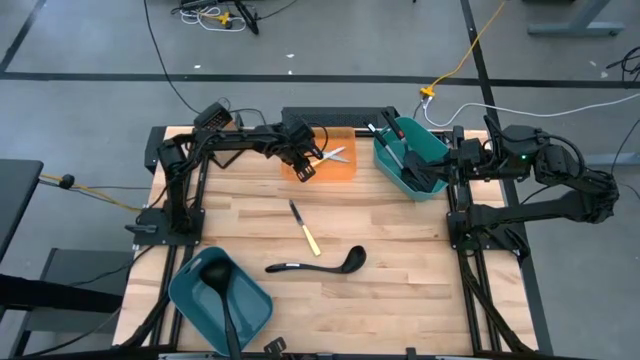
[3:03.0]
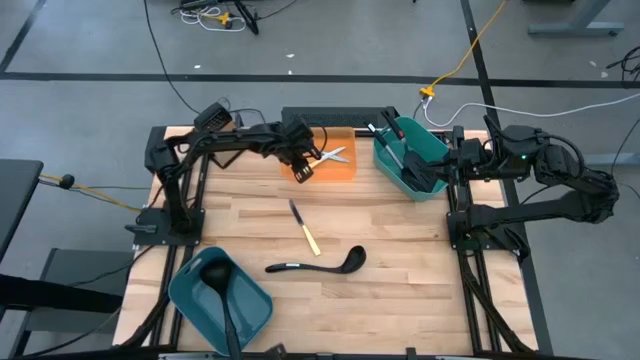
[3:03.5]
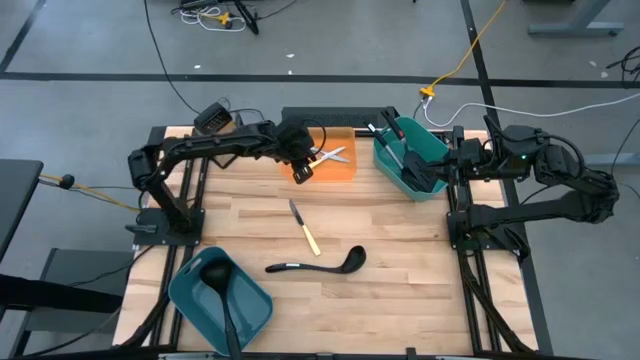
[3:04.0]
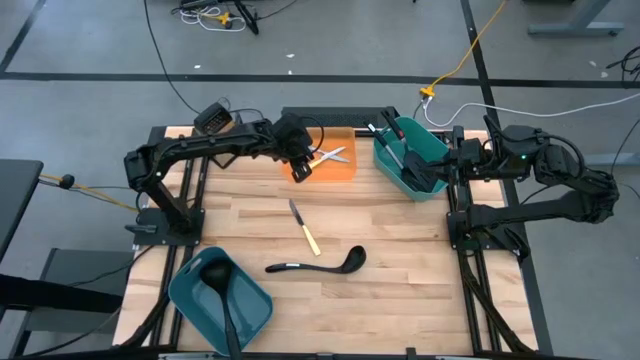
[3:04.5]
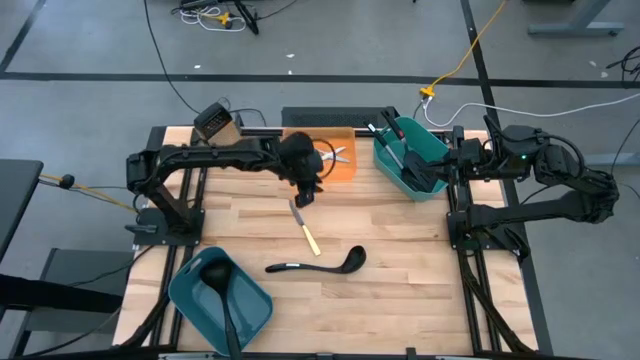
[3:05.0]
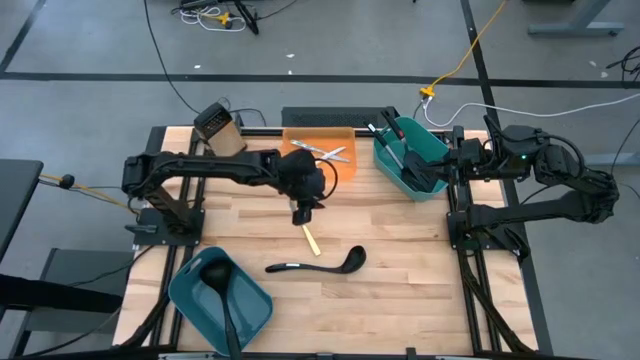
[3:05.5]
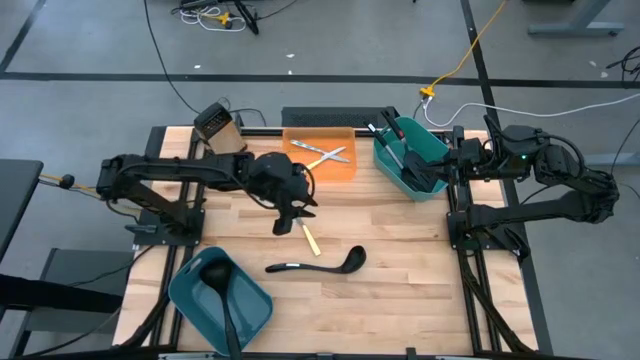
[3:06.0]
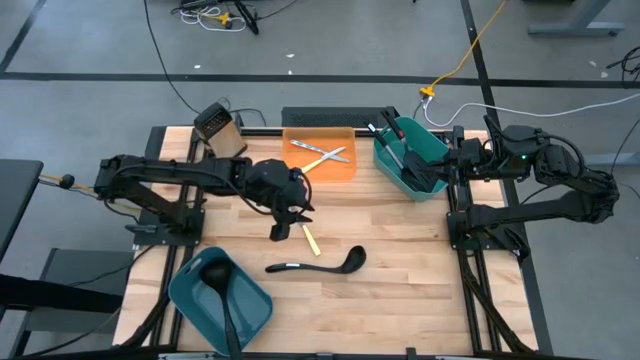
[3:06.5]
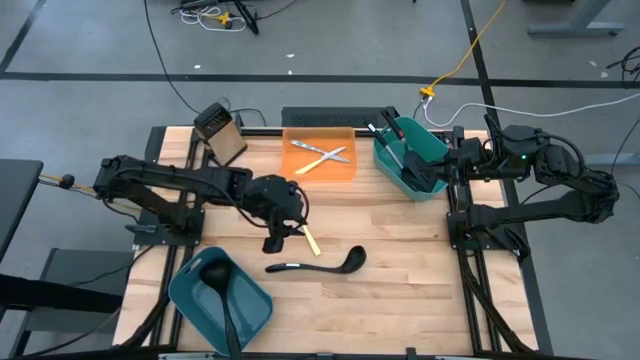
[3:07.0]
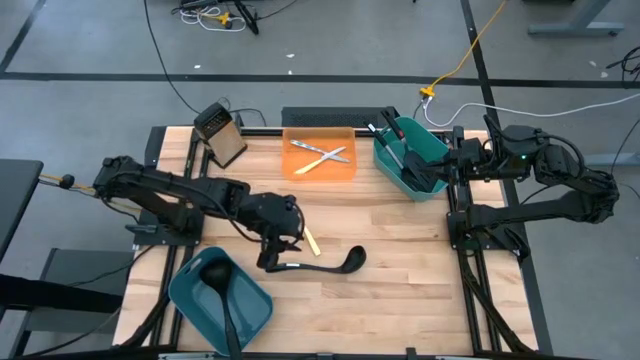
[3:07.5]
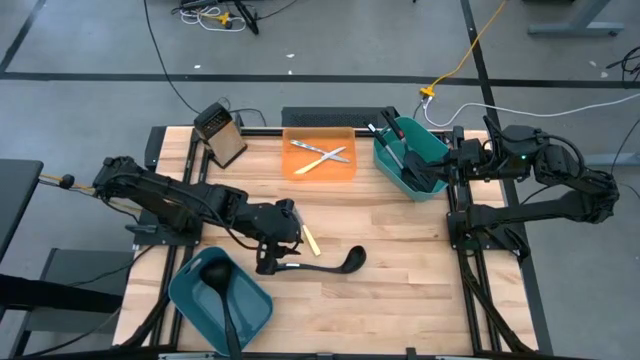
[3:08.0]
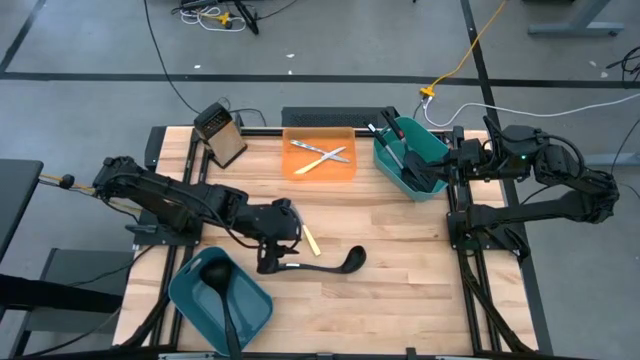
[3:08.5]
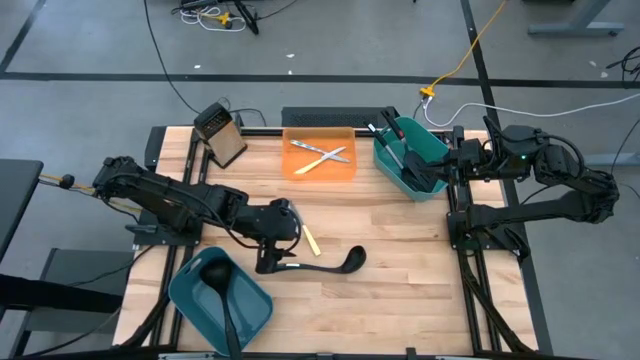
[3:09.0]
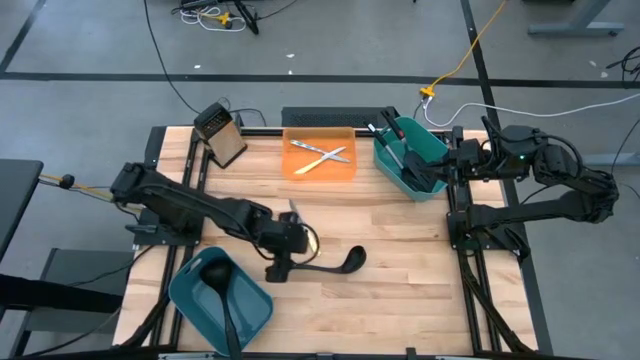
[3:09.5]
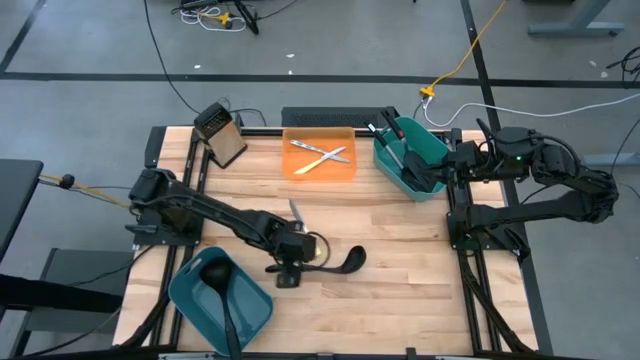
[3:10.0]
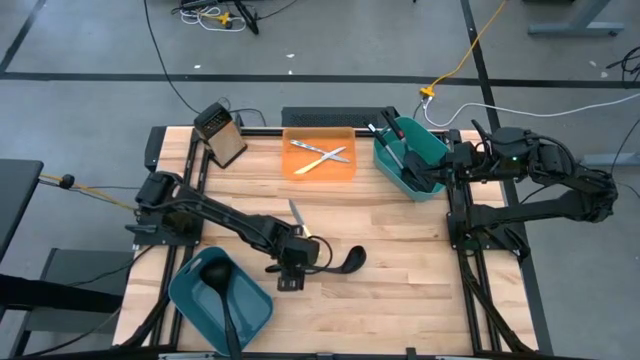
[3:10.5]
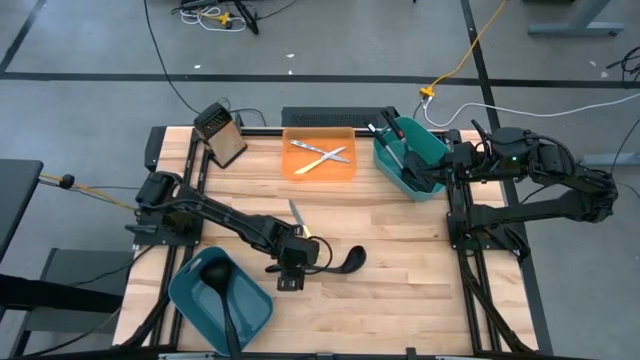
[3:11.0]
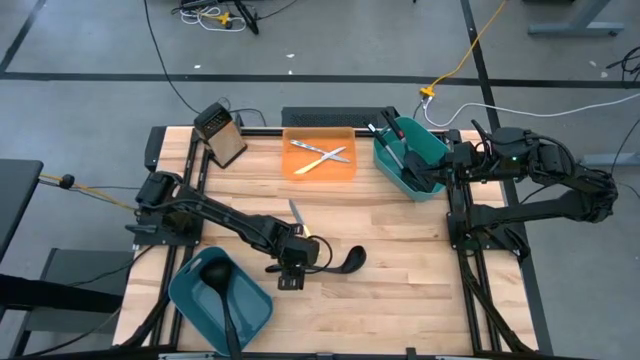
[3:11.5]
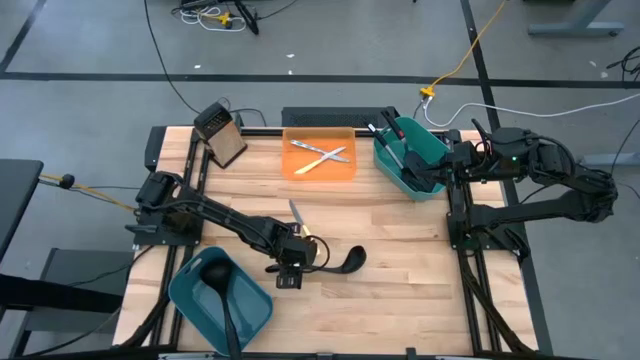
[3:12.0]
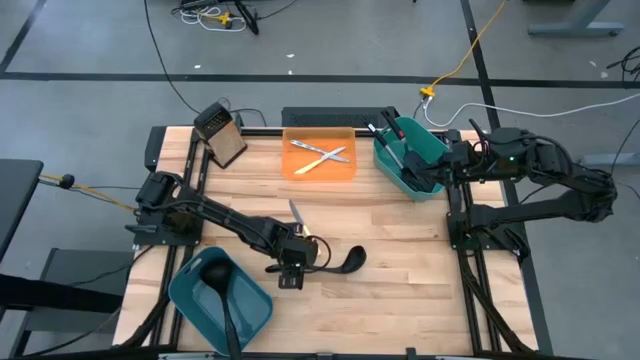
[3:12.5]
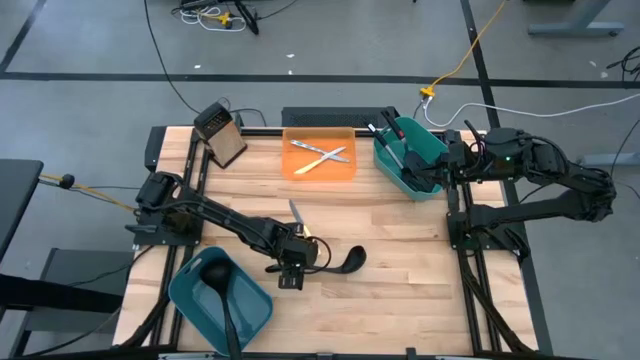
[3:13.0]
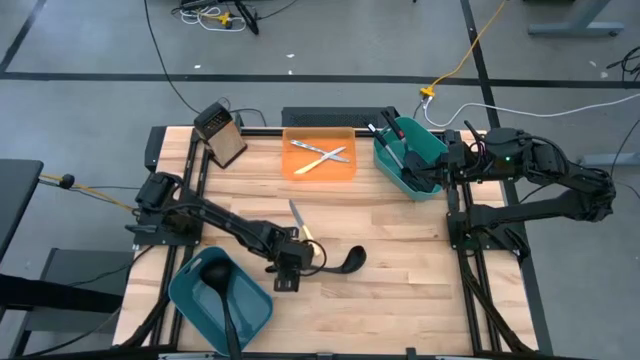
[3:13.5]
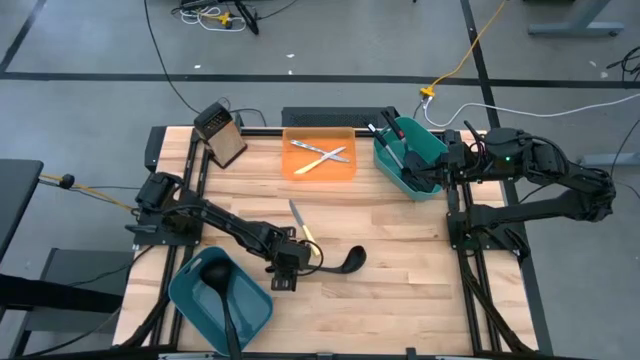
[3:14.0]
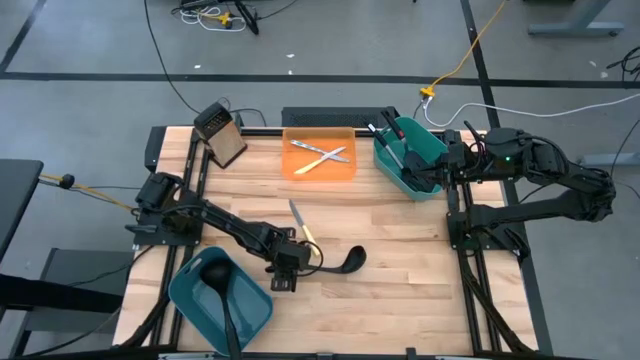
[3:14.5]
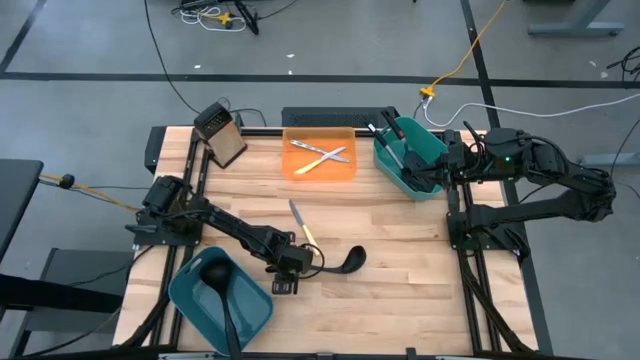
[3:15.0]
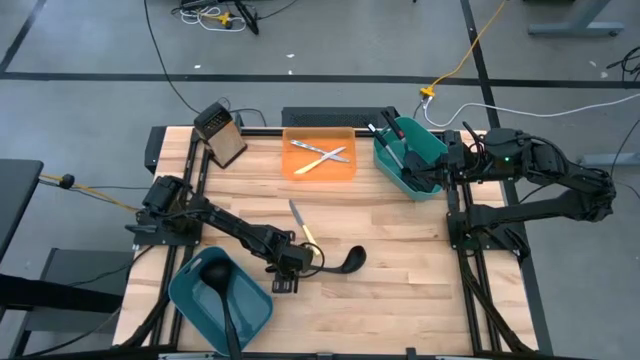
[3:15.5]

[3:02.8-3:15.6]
Task: Pick & Place Kitchen Items
Put the black ladle into the blue bin

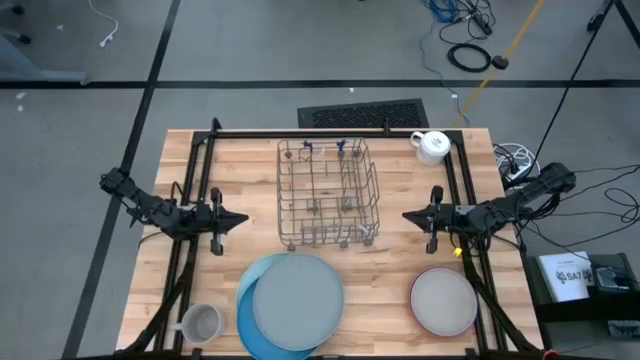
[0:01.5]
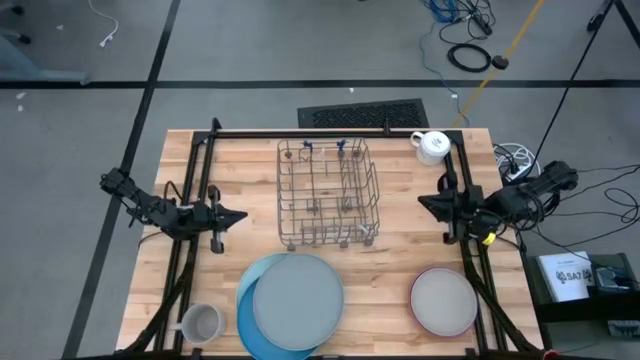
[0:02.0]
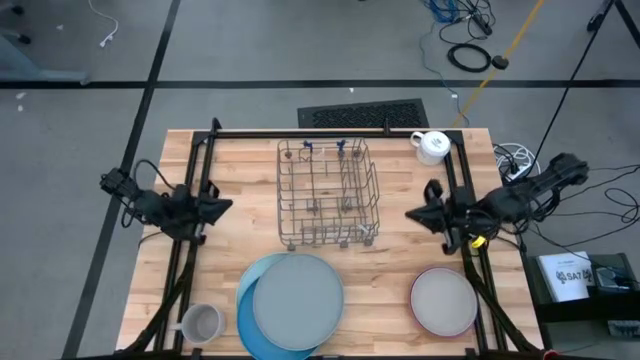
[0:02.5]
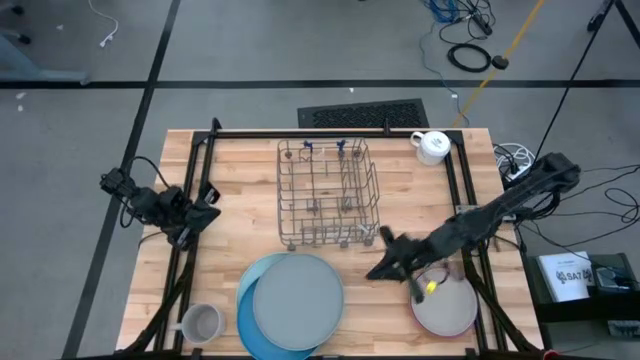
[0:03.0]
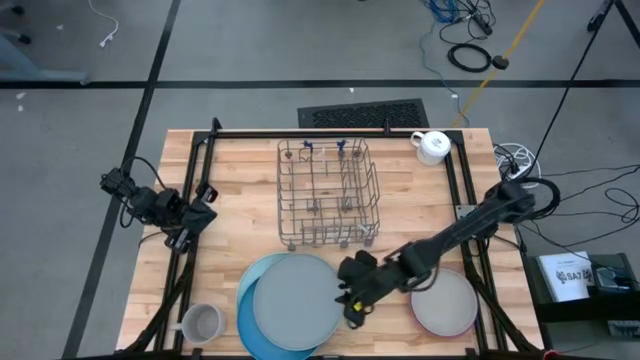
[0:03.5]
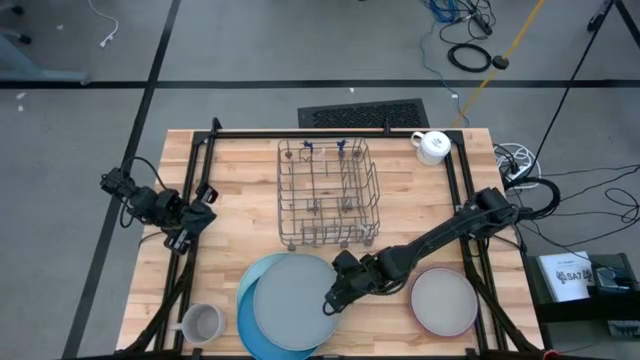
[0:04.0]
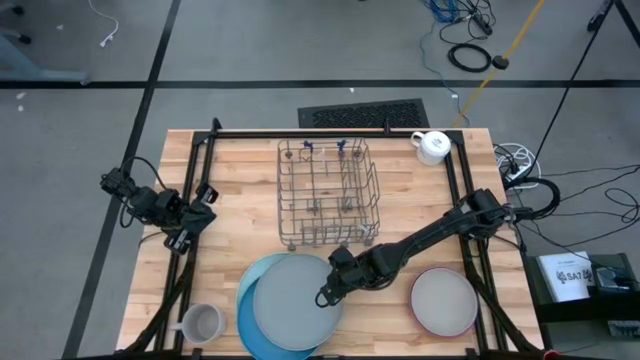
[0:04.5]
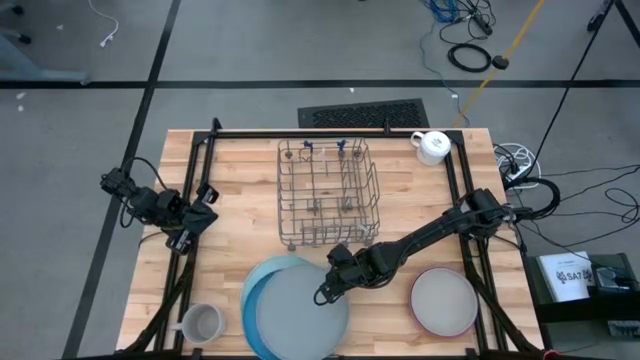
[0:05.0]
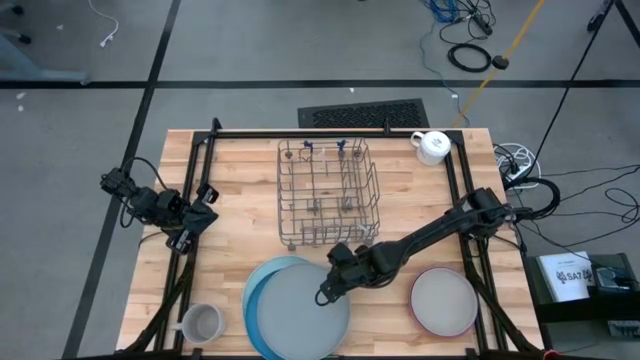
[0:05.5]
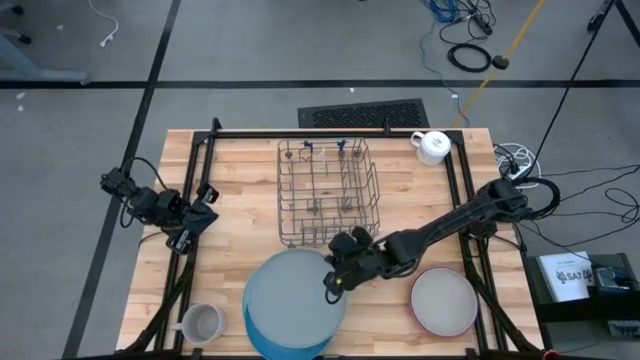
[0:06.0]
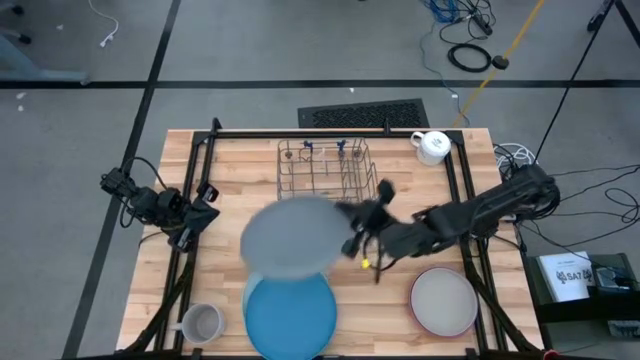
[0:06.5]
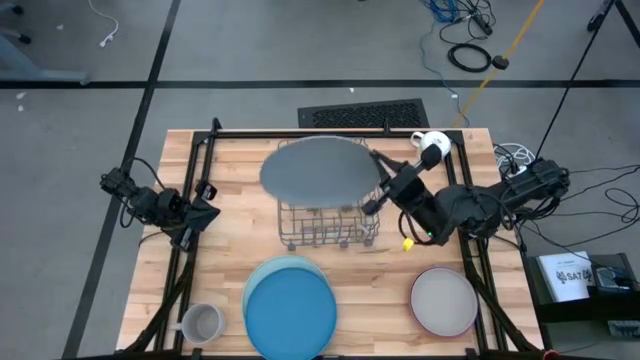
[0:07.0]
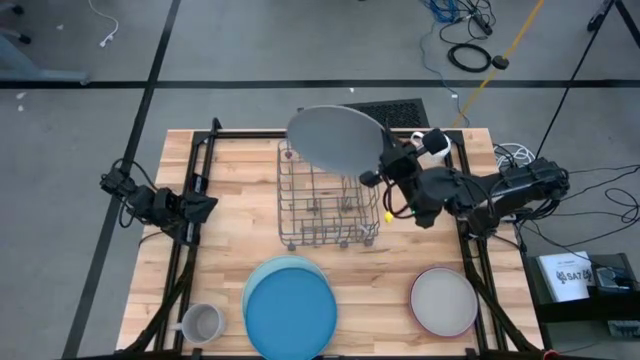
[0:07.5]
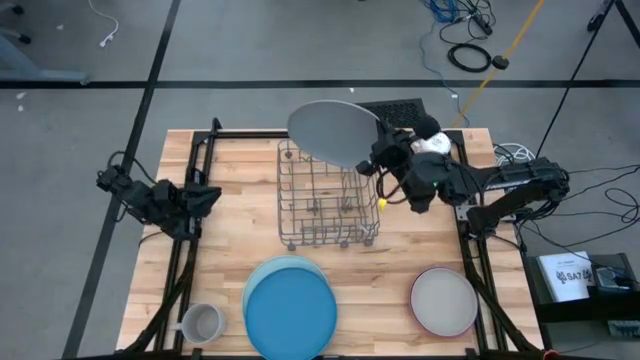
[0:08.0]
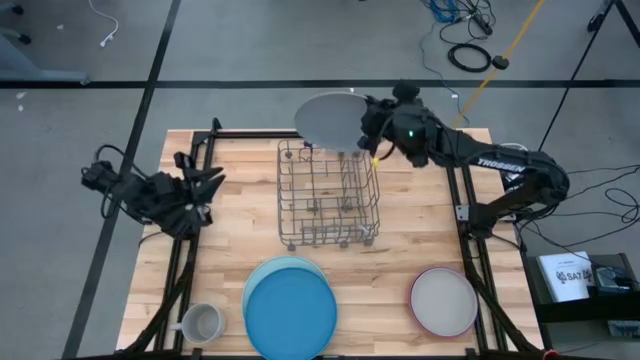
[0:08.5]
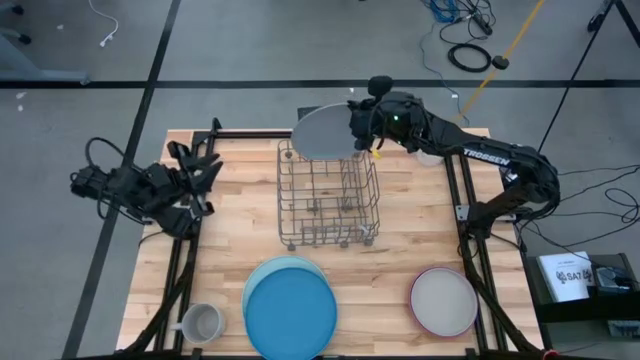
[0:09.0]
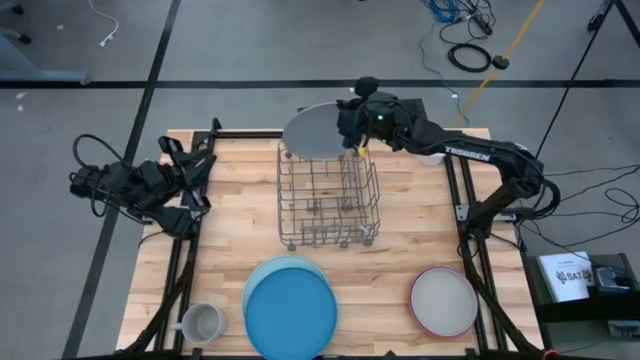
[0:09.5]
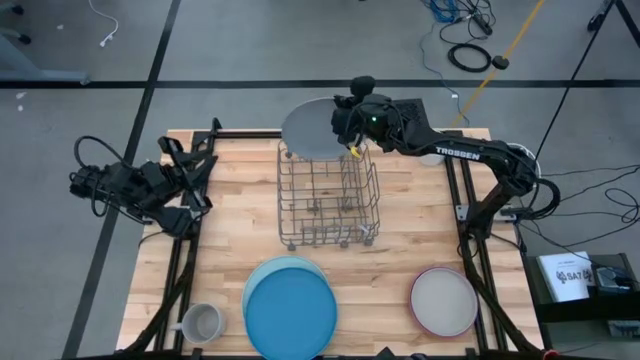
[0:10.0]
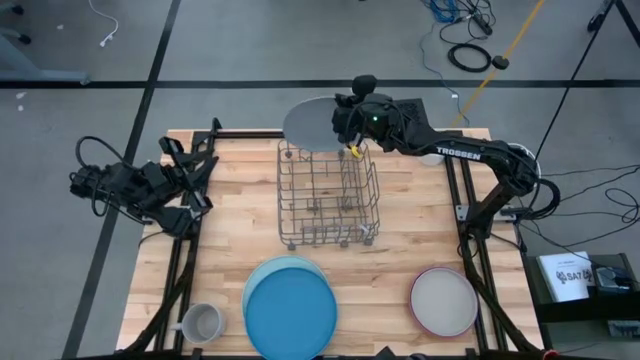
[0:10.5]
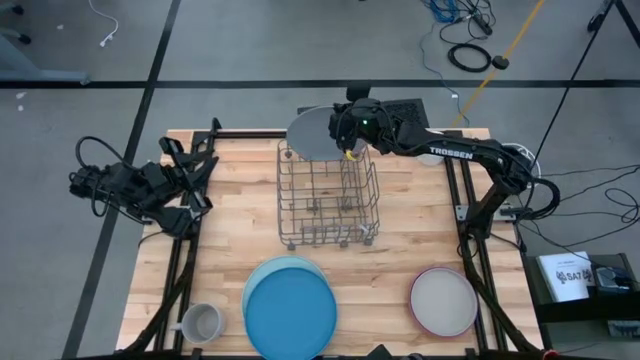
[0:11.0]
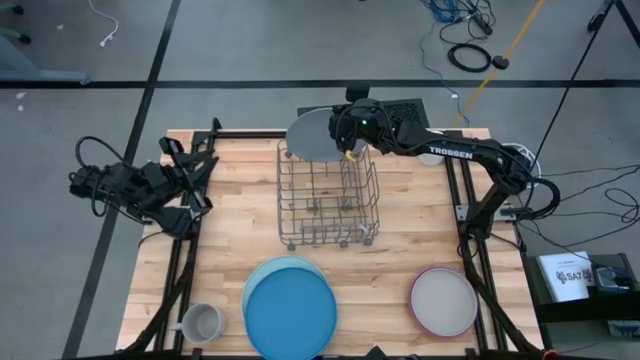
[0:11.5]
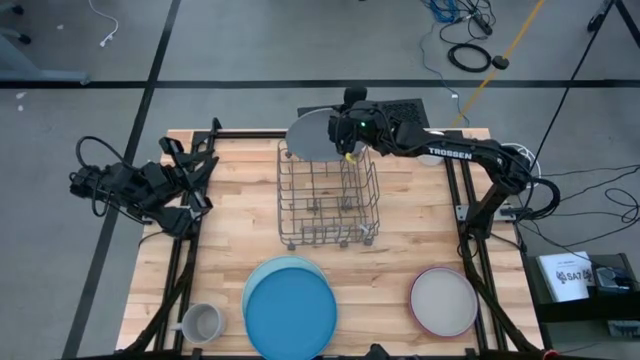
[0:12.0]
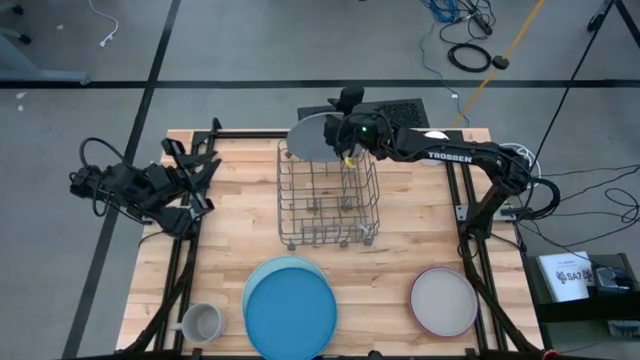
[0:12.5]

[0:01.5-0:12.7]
Task: Sort dishes
Put the large gray plate into the dish rack
